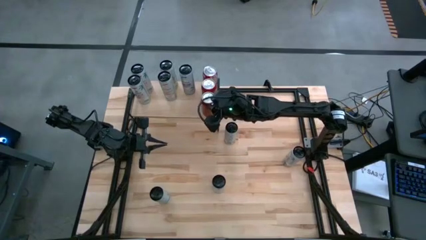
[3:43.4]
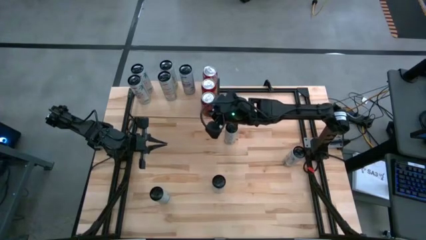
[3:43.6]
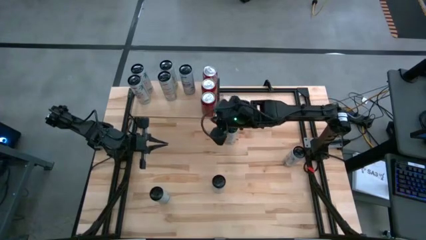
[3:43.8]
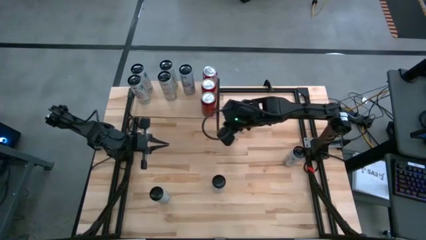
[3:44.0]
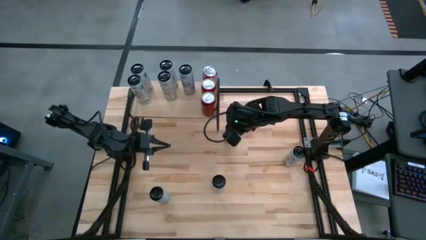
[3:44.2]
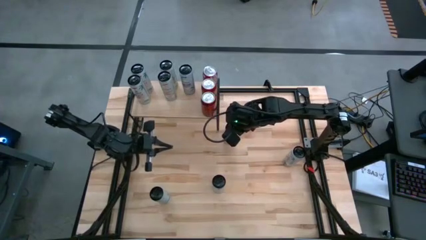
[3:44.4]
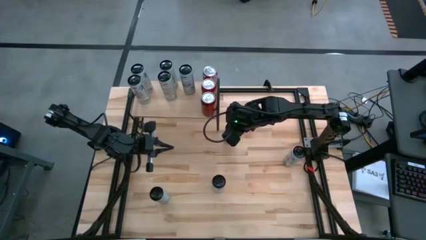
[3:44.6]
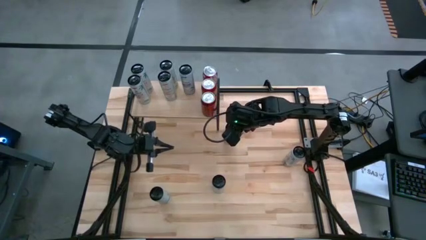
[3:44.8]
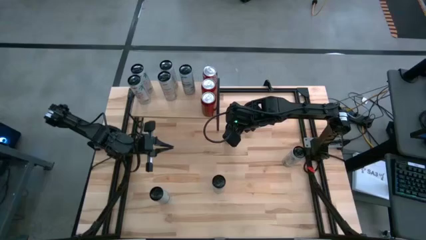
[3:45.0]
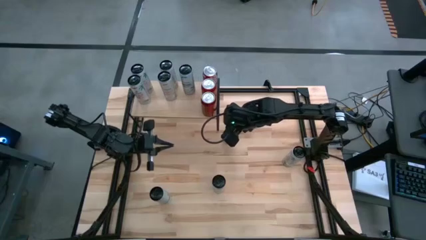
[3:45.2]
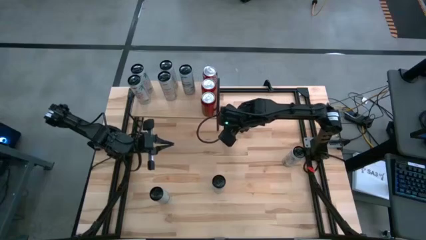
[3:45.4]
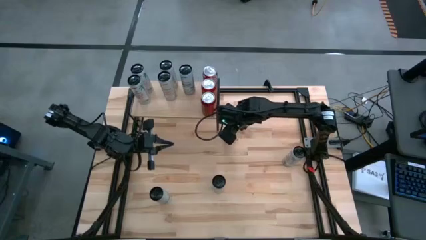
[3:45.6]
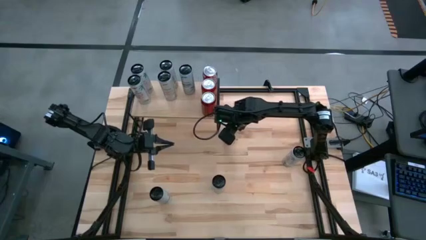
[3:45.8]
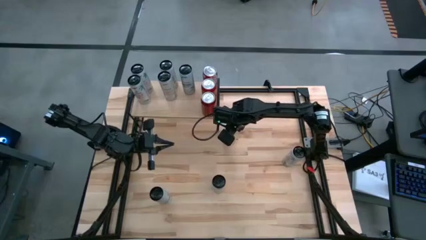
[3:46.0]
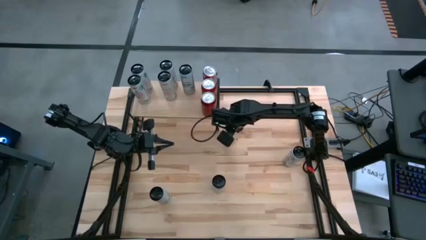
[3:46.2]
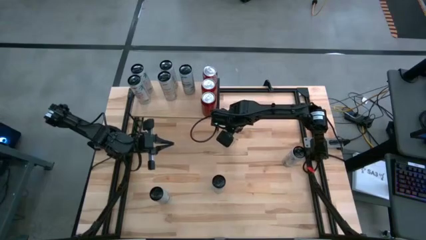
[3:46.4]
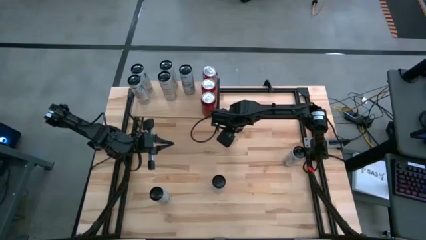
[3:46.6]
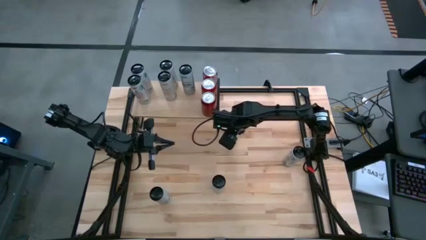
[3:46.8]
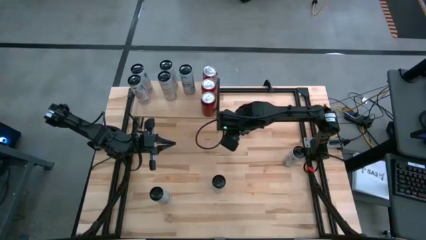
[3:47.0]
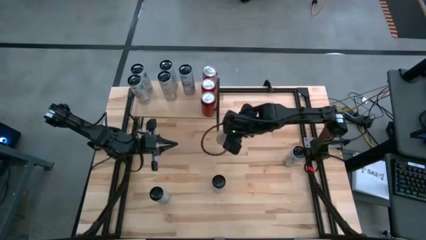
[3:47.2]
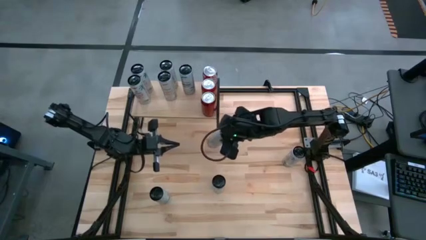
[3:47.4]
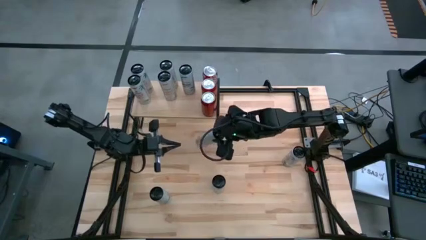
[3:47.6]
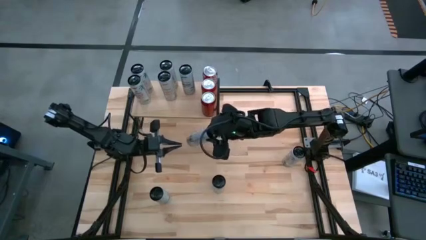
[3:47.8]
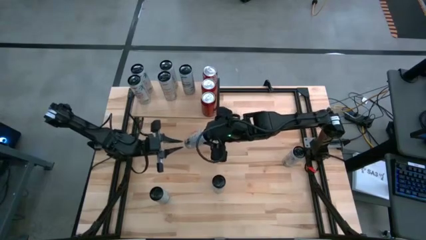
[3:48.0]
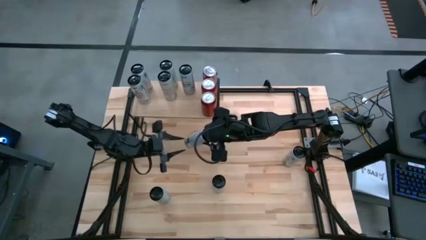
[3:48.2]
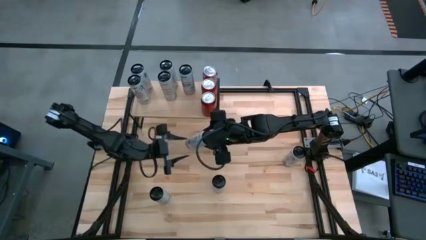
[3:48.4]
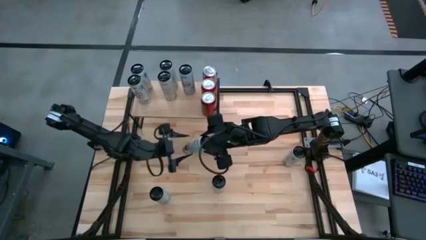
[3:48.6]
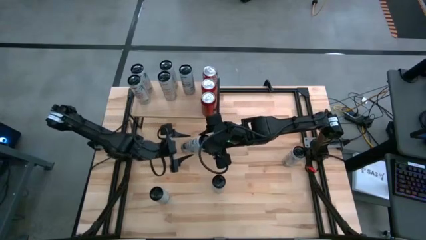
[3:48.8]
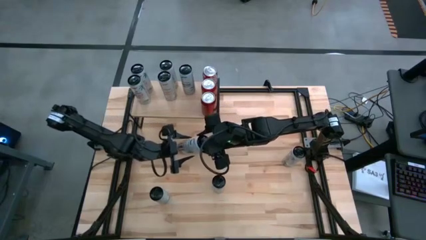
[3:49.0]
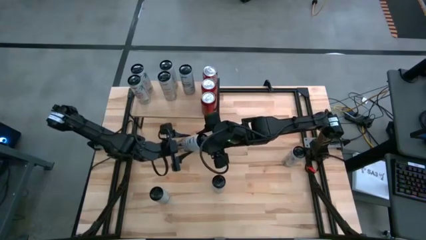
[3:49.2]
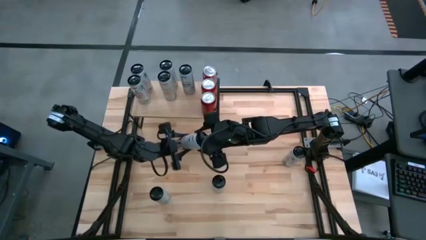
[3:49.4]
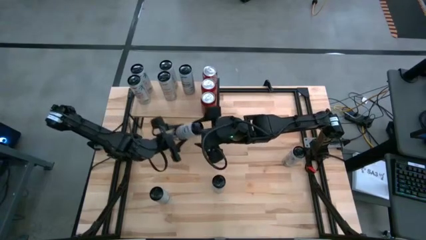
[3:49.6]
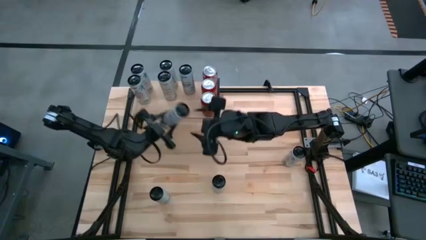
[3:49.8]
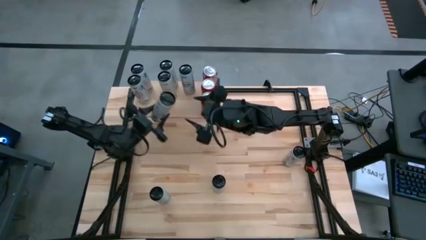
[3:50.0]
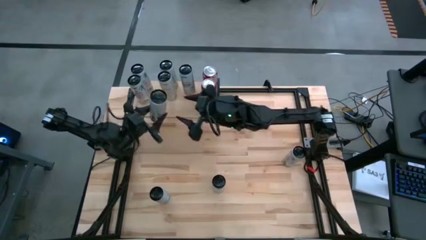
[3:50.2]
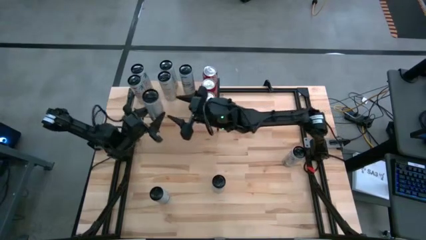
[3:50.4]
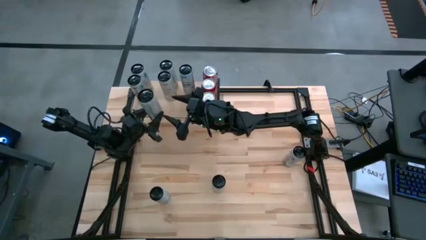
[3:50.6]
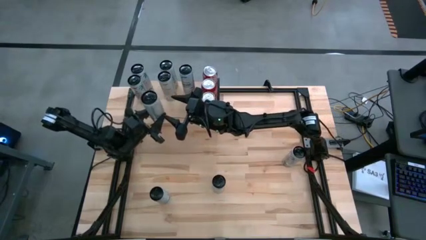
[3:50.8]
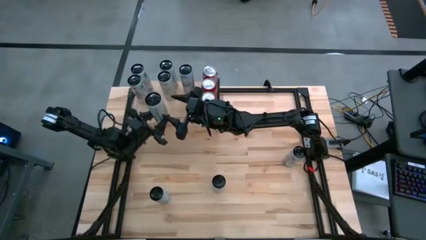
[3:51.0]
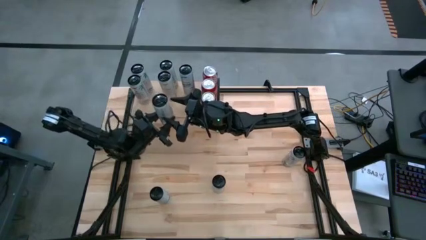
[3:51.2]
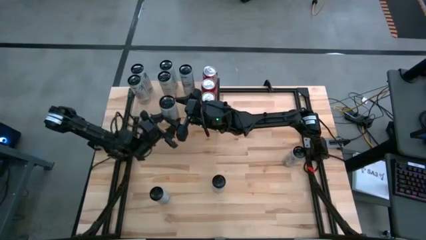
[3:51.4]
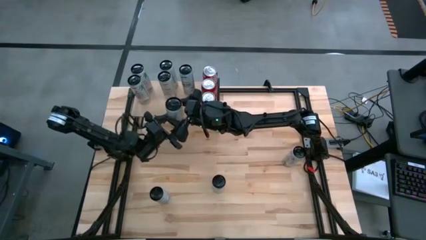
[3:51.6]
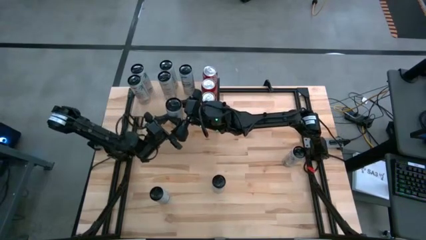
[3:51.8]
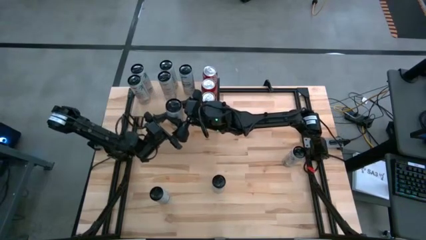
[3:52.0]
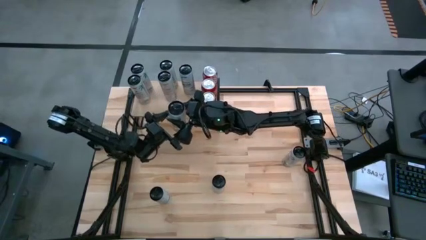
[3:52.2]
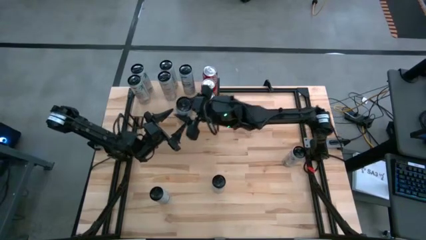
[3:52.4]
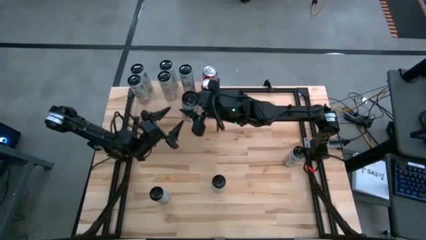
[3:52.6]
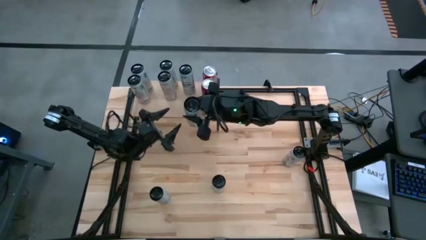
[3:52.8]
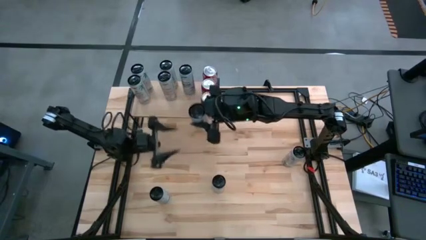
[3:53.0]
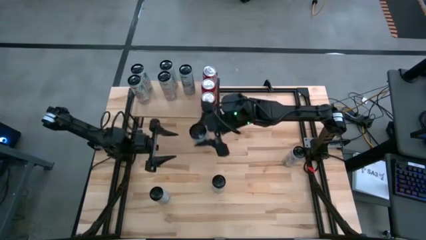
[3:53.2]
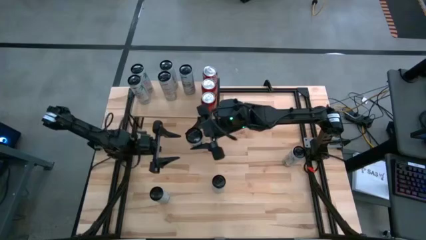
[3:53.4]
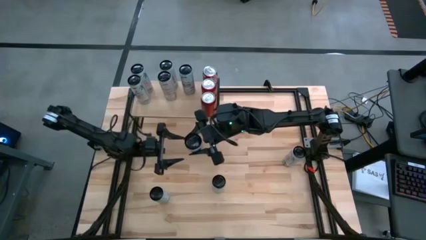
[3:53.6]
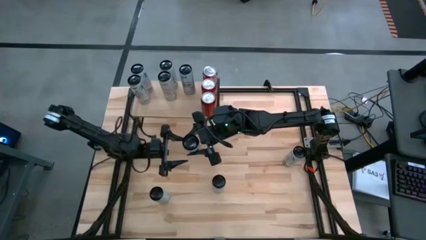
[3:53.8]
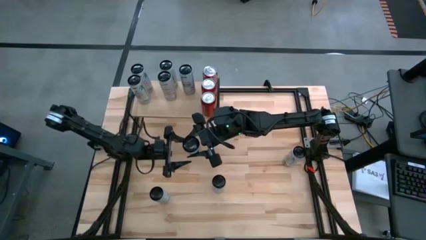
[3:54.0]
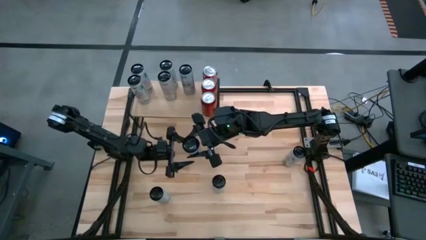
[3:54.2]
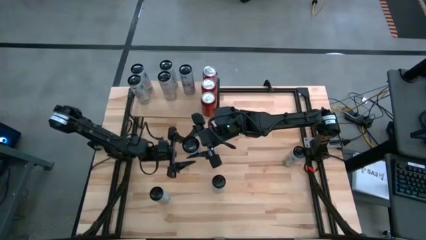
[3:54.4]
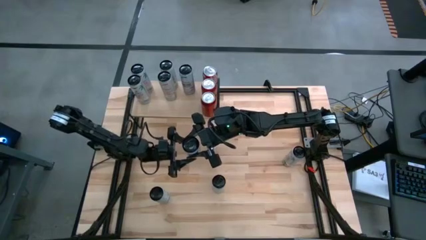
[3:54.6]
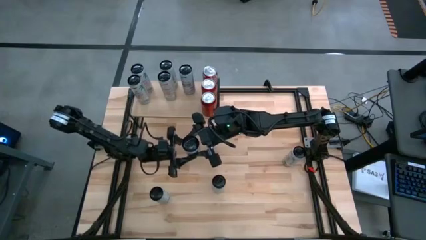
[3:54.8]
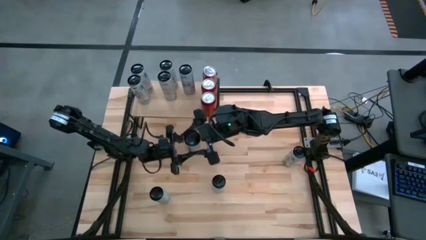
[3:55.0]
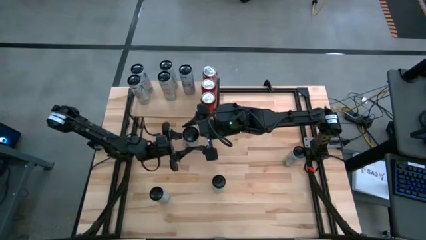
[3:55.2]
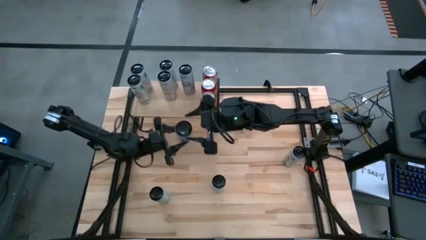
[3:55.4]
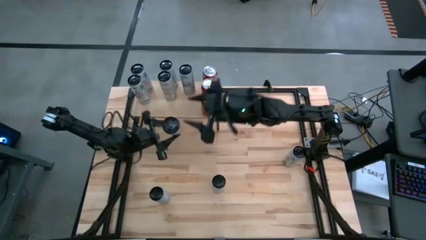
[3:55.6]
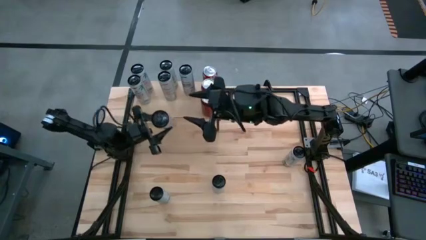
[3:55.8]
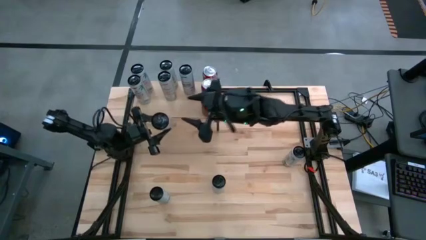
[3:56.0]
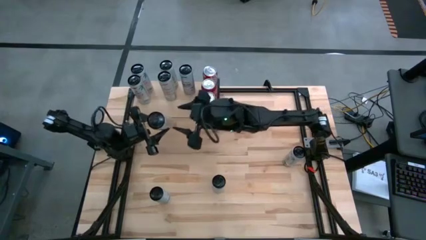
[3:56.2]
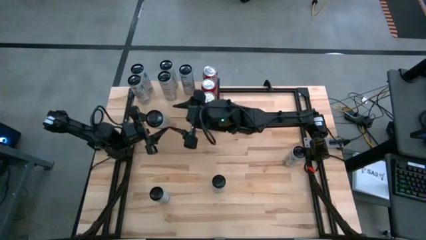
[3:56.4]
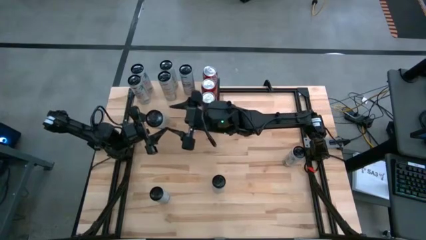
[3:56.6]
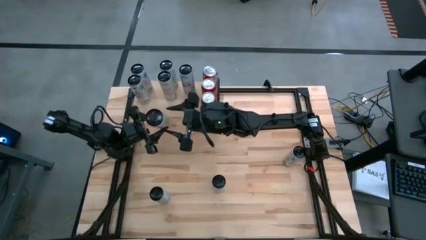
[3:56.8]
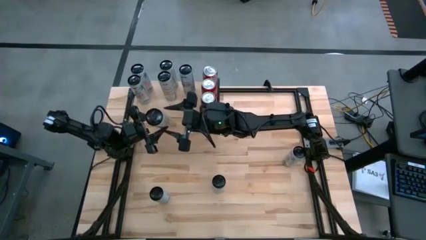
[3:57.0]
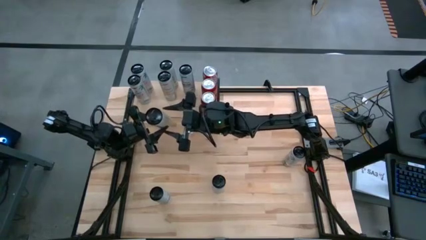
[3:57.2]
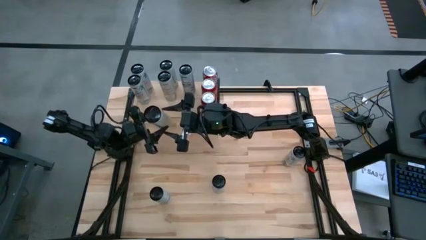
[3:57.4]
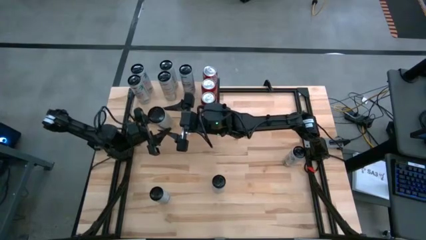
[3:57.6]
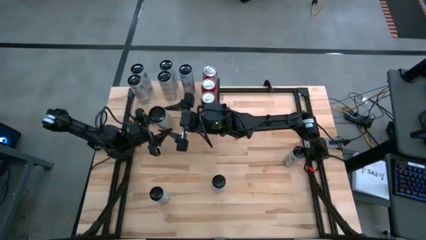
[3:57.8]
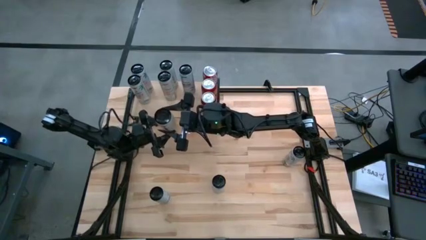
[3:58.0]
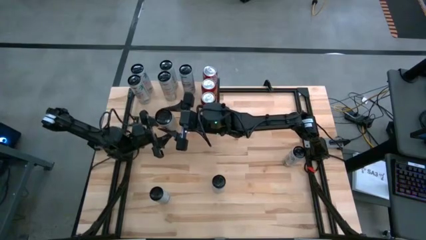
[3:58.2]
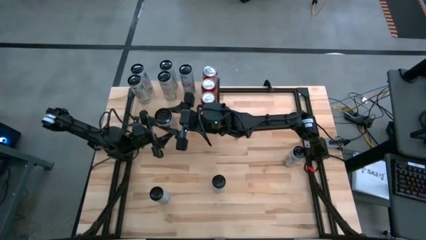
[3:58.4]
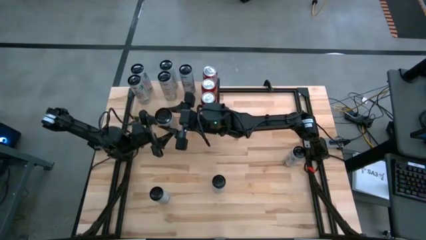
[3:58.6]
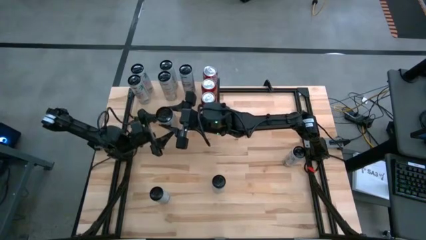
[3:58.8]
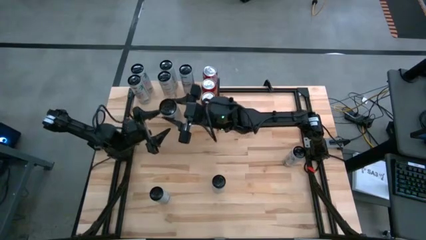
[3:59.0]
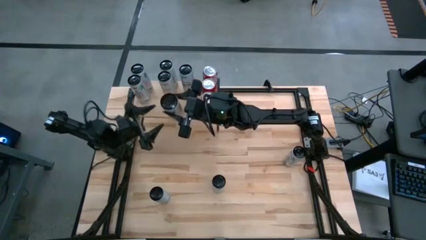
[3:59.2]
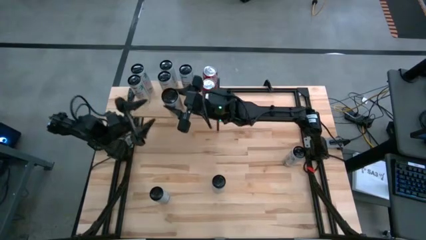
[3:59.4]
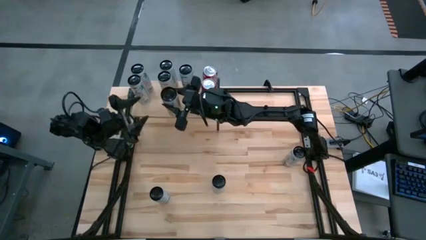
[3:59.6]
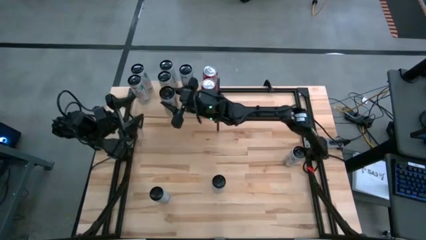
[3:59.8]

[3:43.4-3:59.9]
Task: Place canned beverage on shelf
Put the white yellow soda can on the shelf aligned with the other white yellow soda cans
